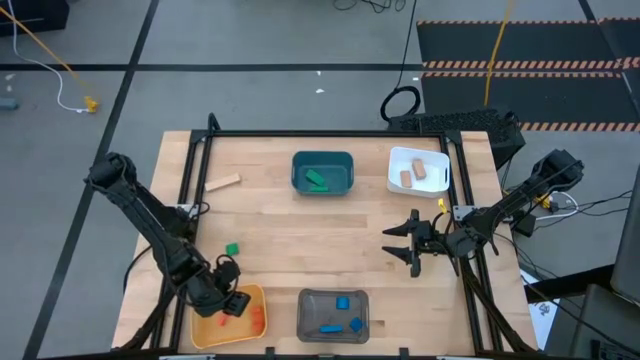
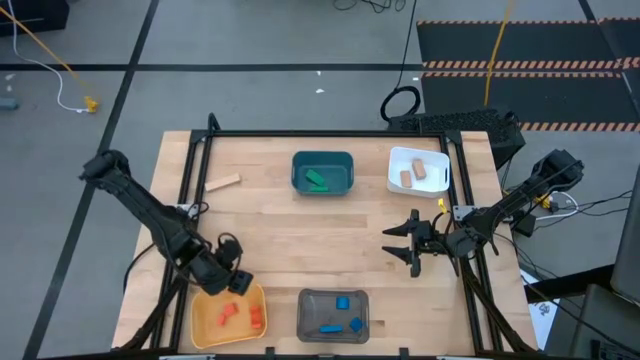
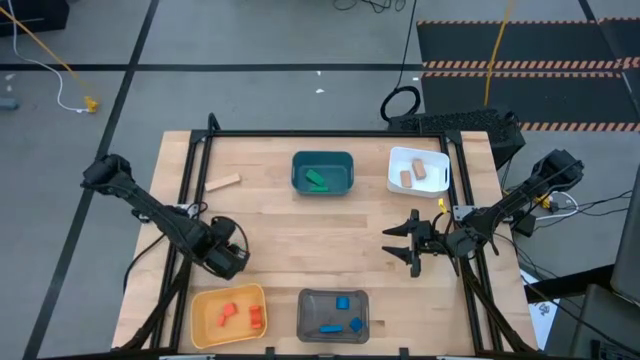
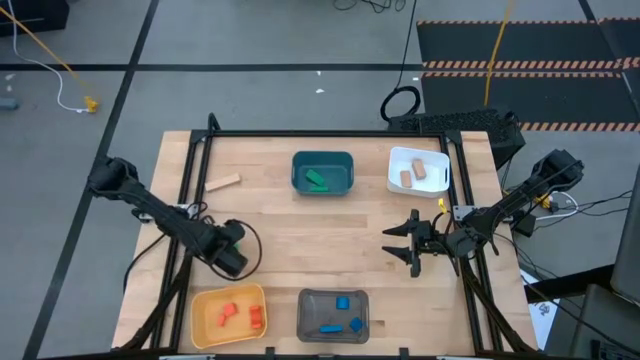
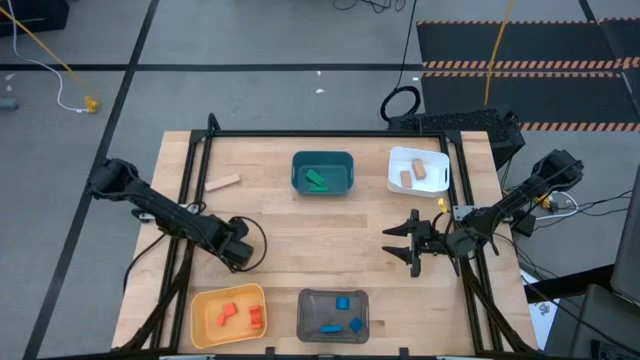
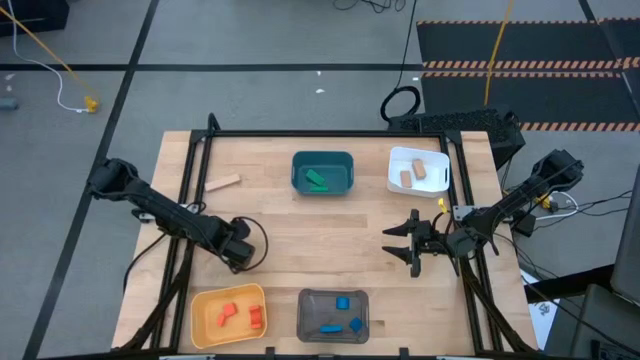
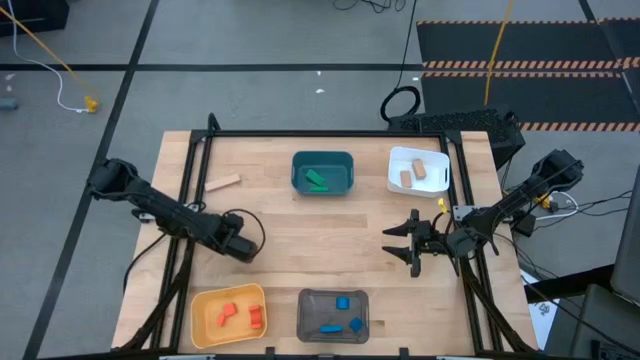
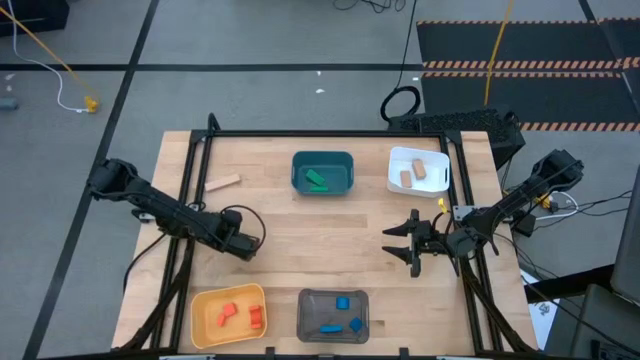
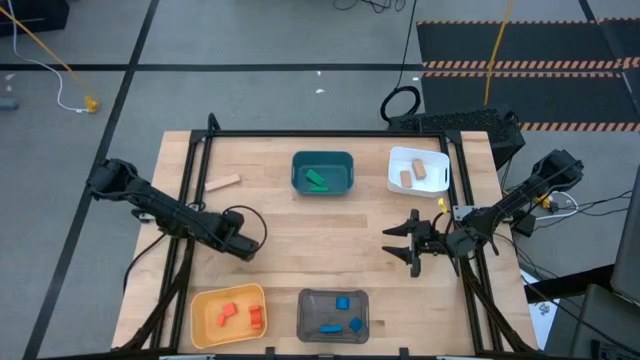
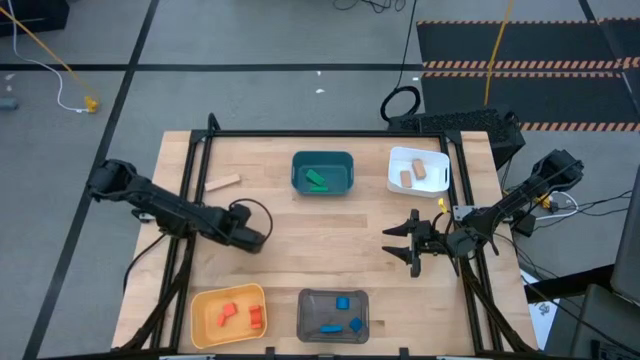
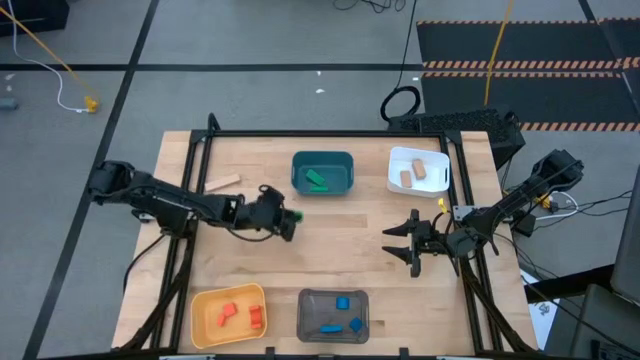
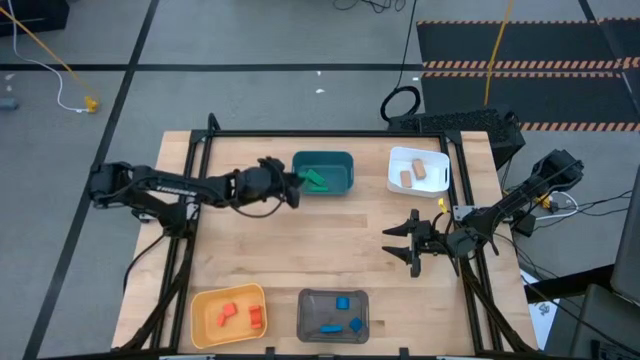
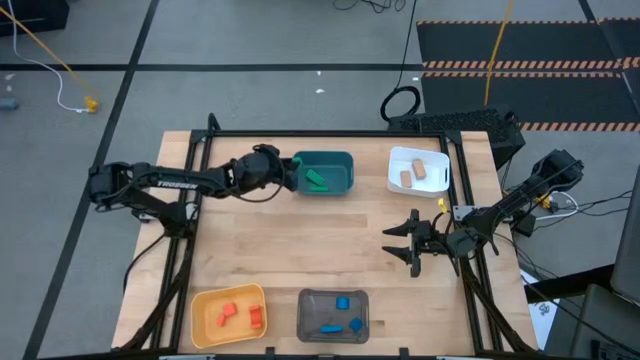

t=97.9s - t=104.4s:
Task: Sort & place blocks by color
Put the green block into the blue bin

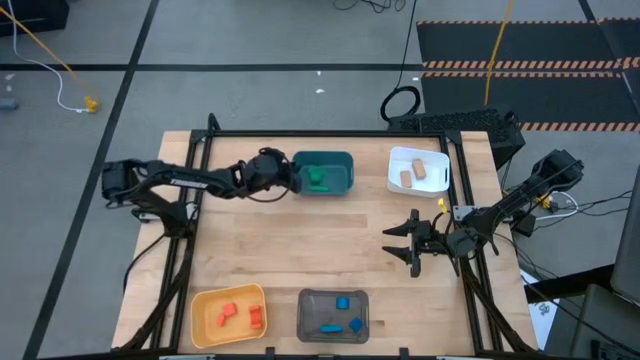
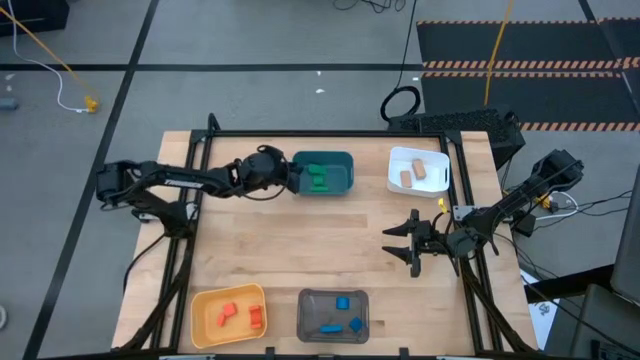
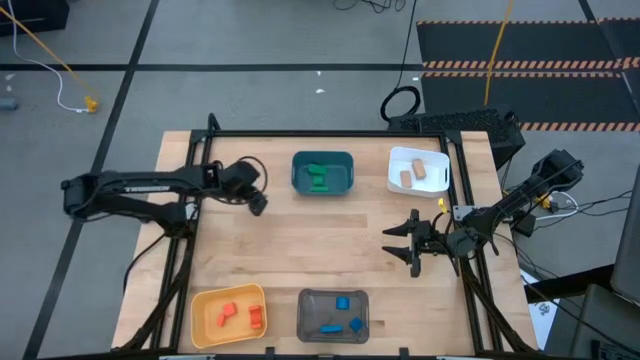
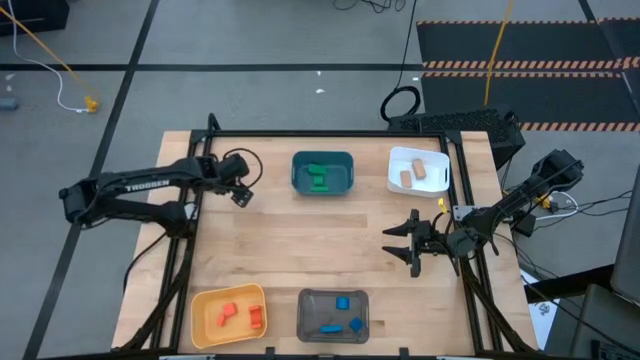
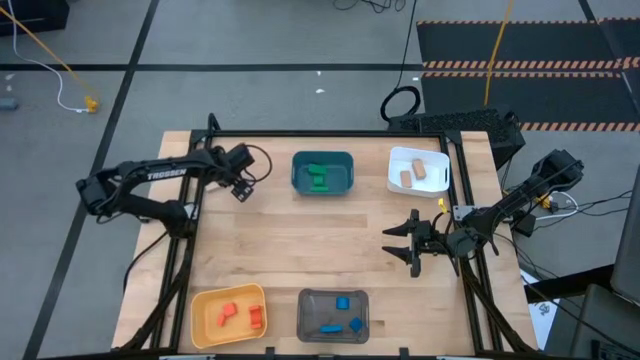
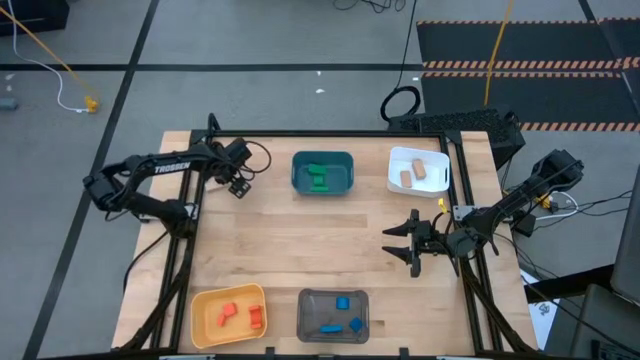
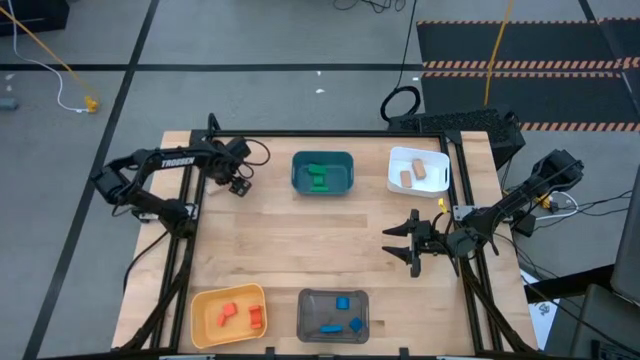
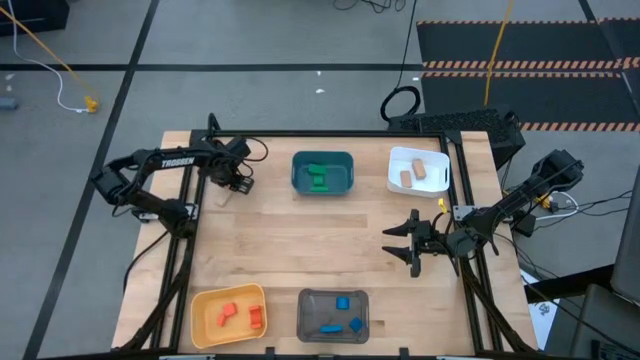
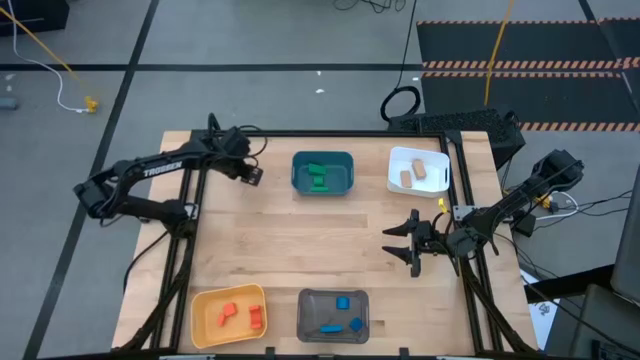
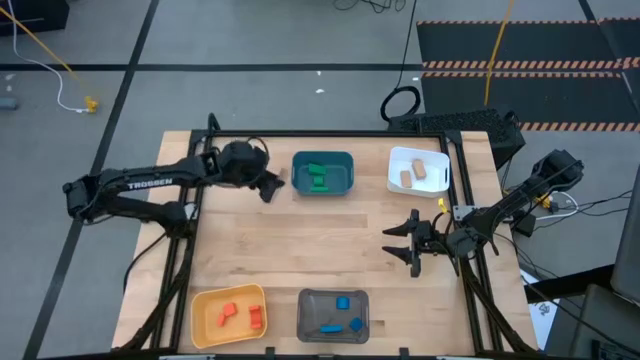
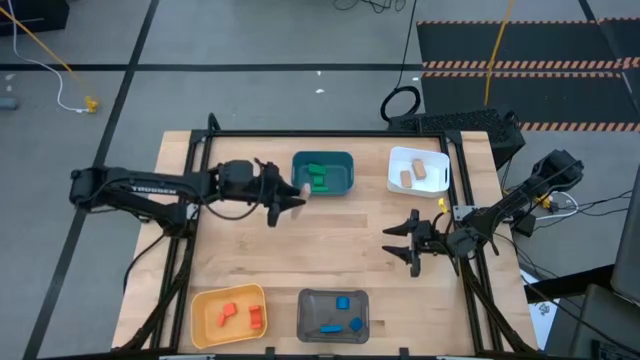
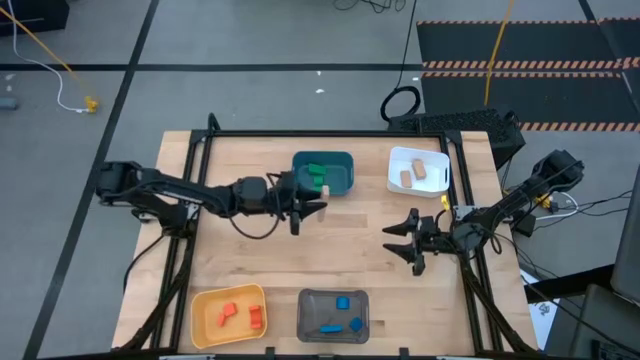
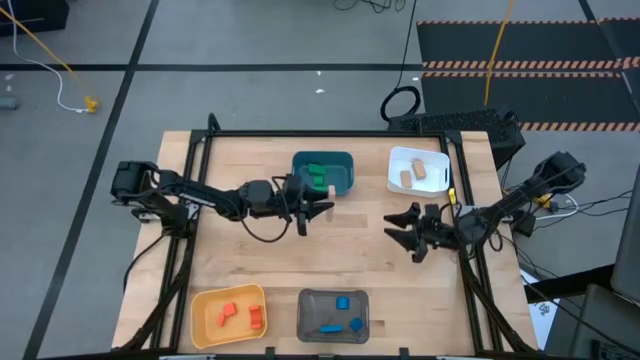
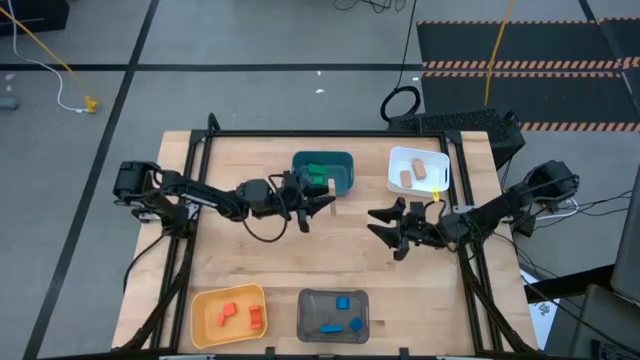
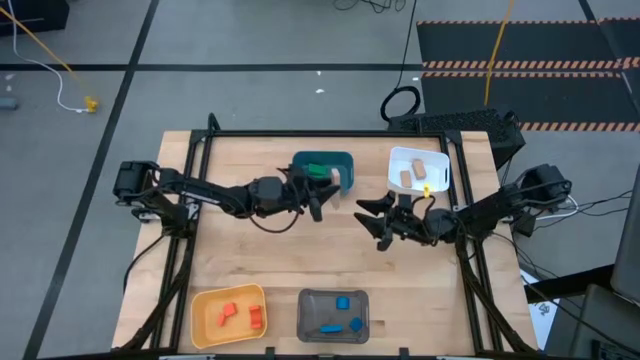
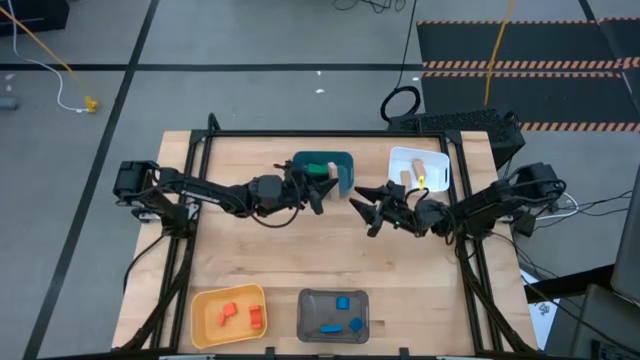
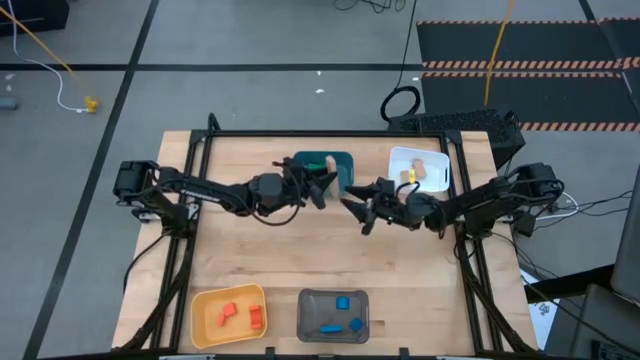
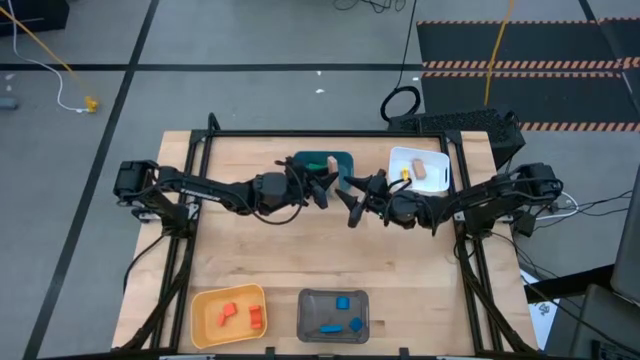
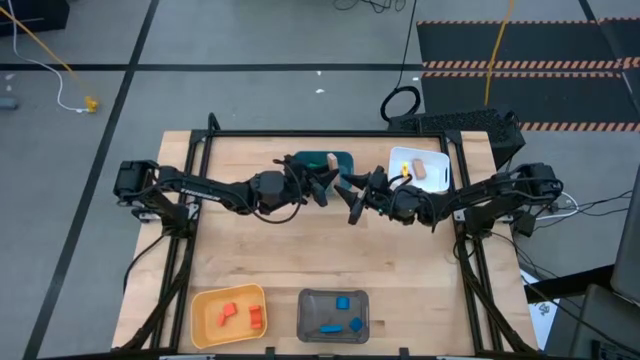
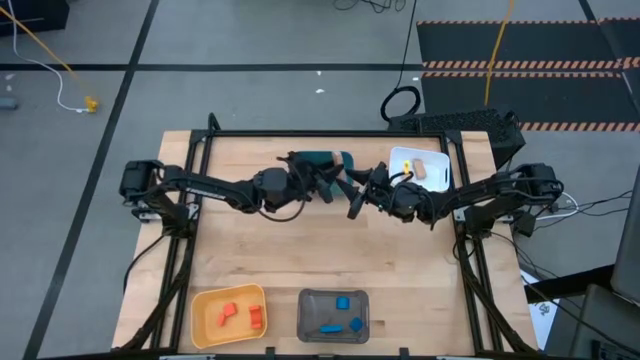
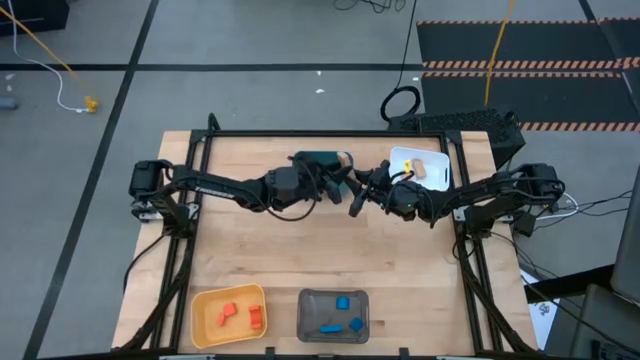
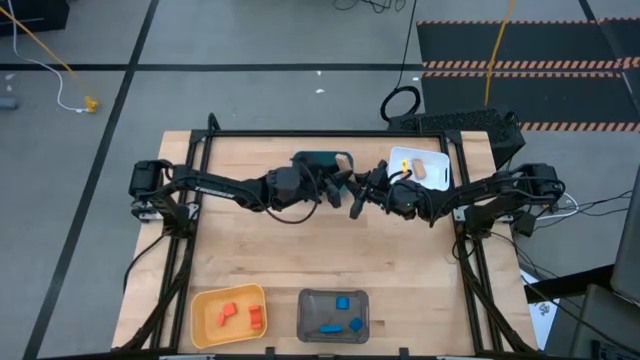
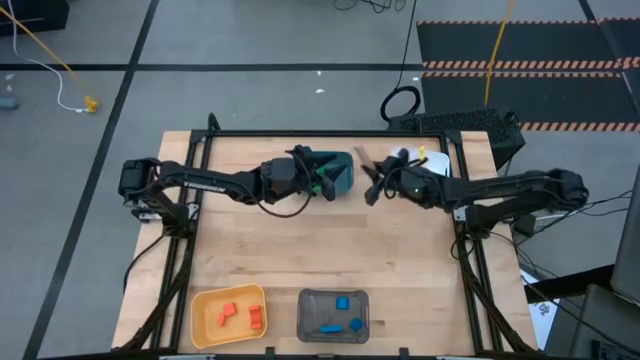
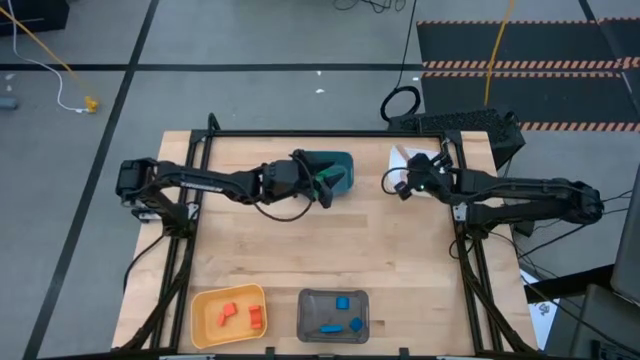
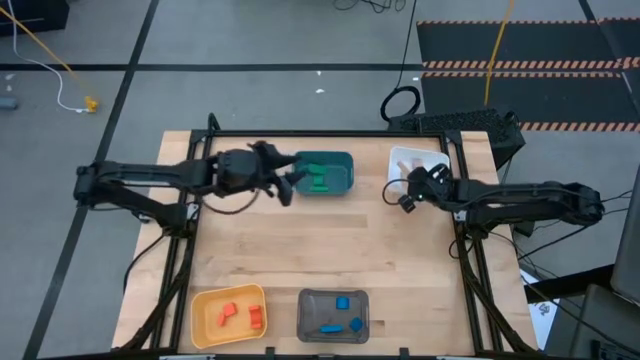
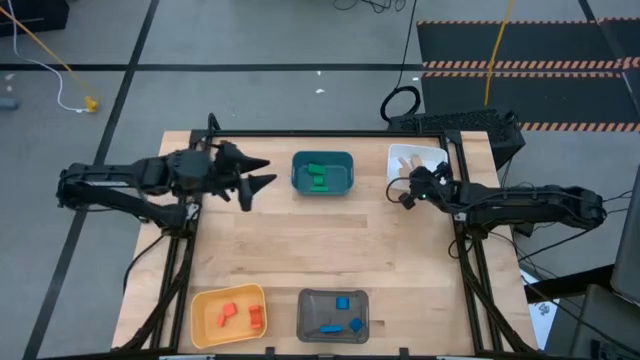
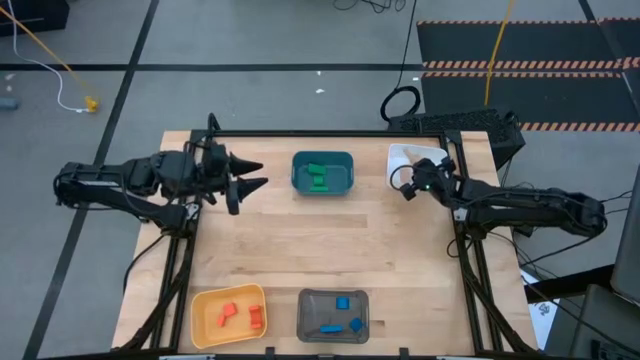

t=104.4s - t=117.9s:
Put the brown block into the white bin
